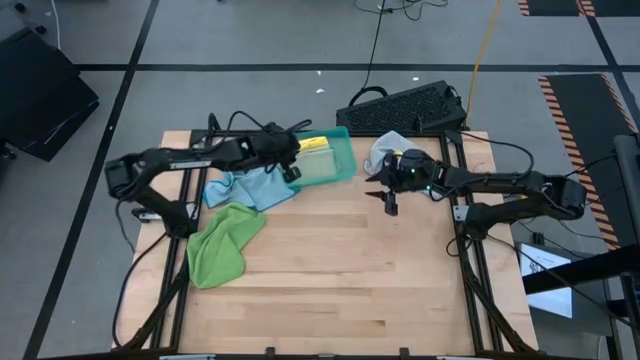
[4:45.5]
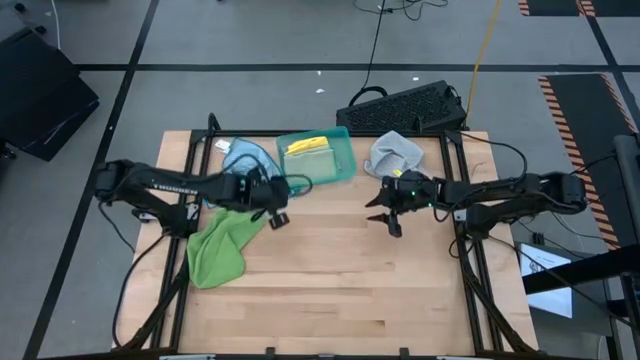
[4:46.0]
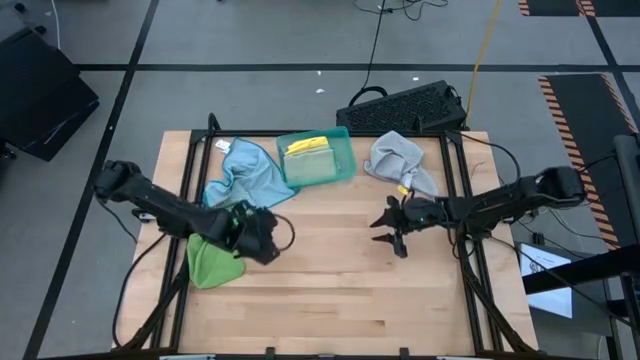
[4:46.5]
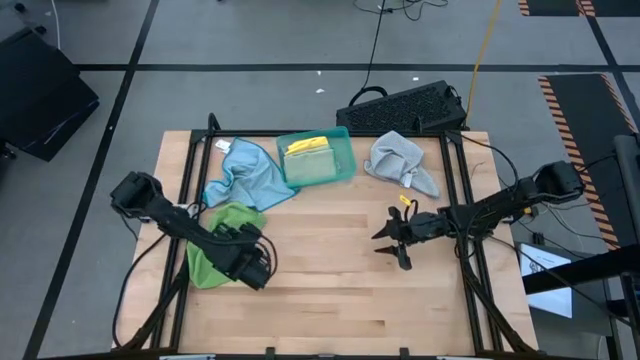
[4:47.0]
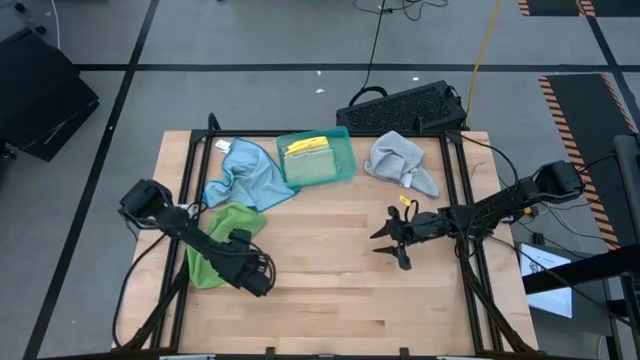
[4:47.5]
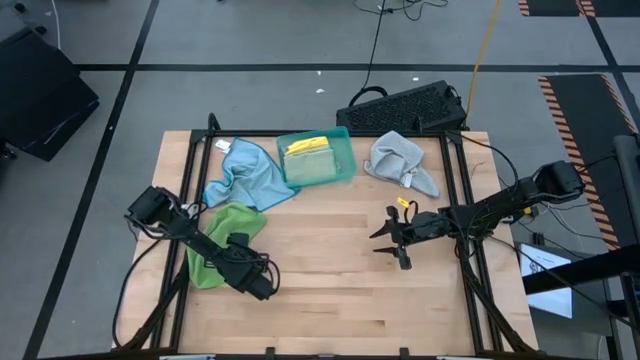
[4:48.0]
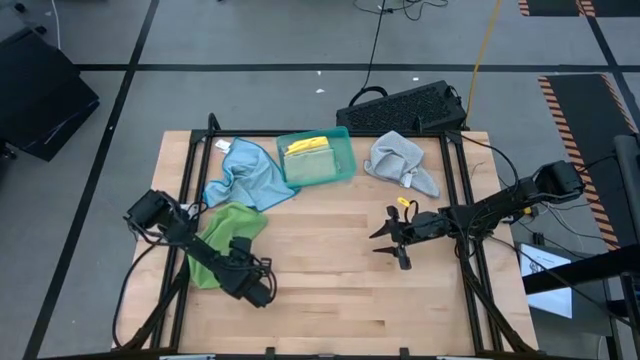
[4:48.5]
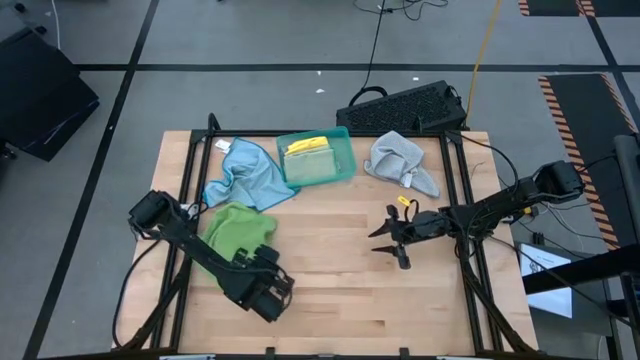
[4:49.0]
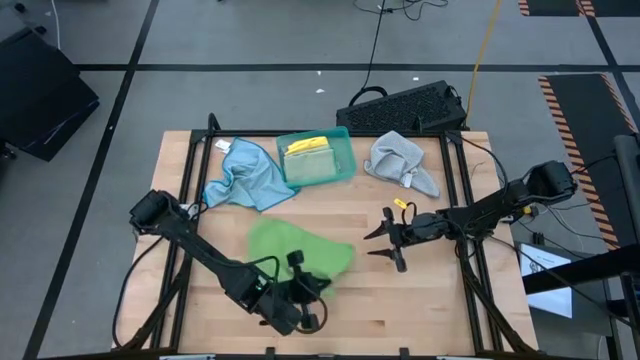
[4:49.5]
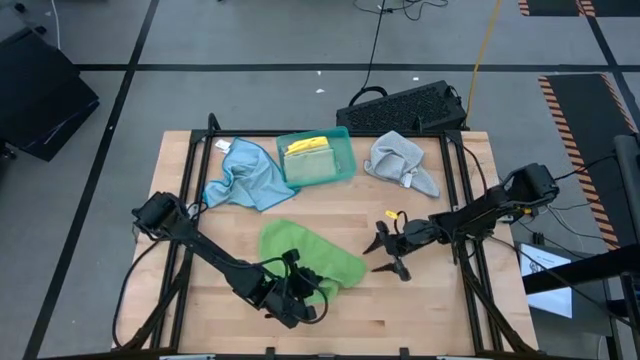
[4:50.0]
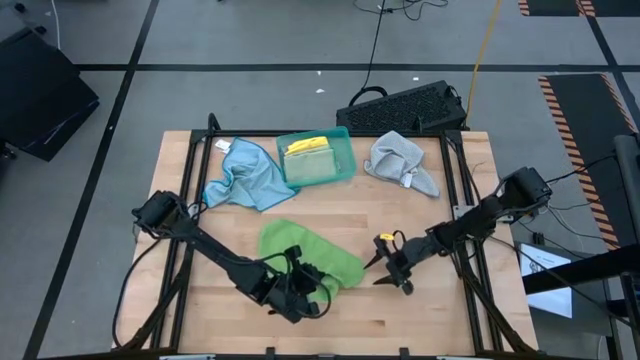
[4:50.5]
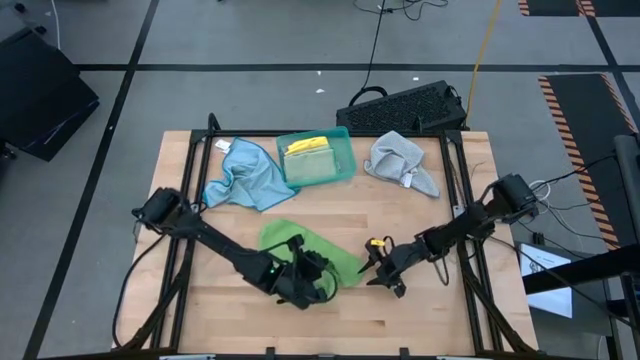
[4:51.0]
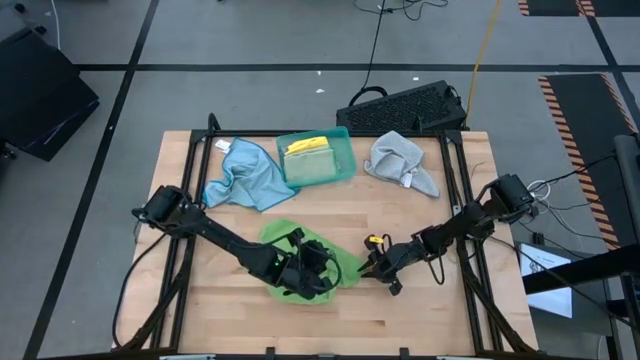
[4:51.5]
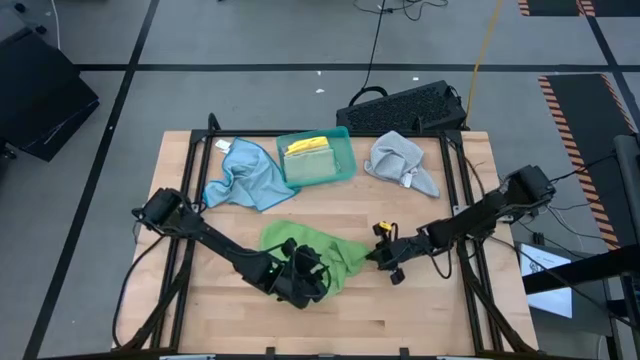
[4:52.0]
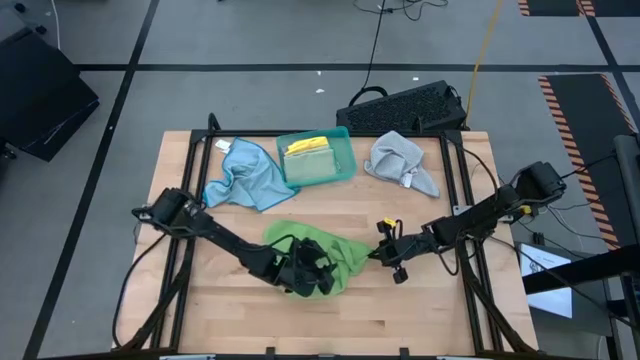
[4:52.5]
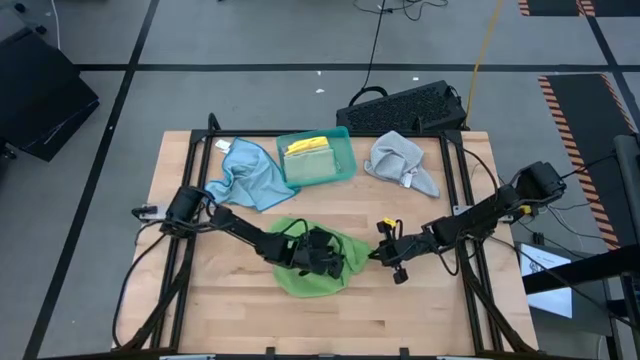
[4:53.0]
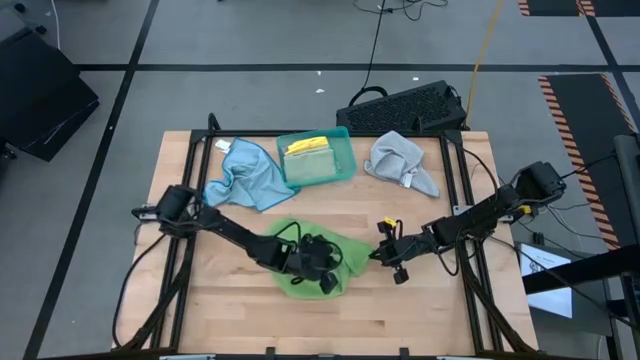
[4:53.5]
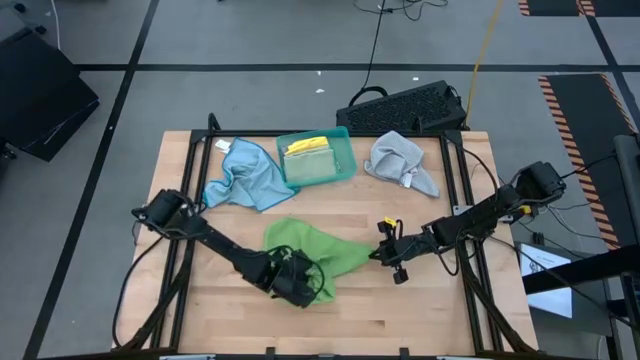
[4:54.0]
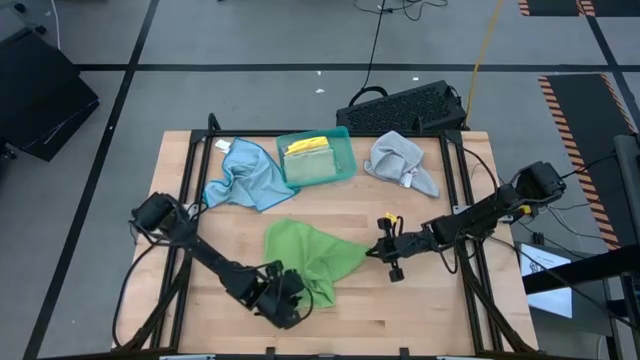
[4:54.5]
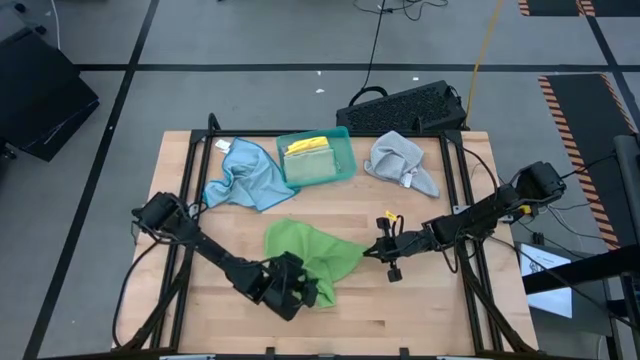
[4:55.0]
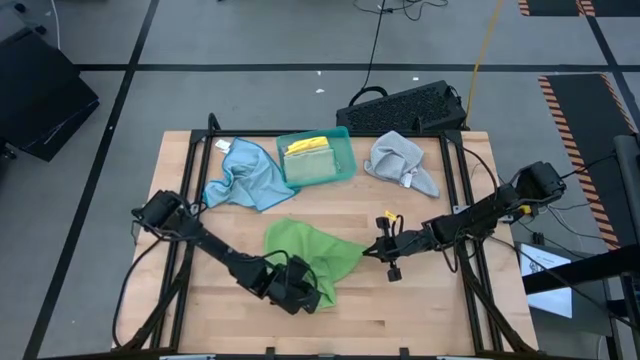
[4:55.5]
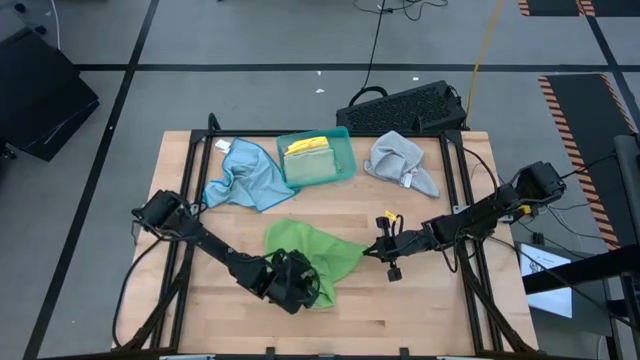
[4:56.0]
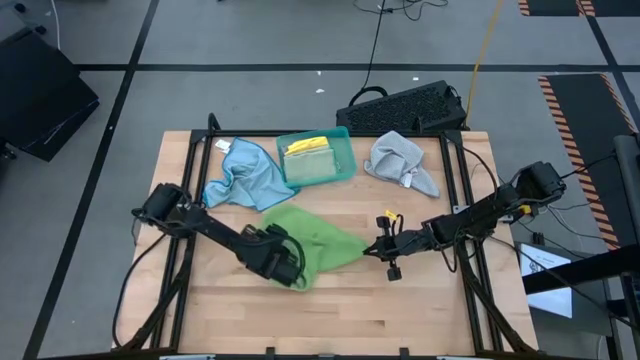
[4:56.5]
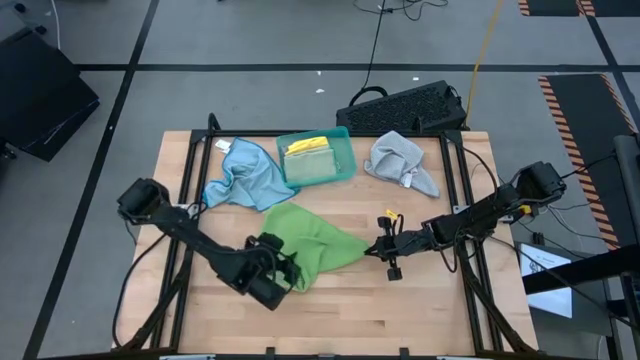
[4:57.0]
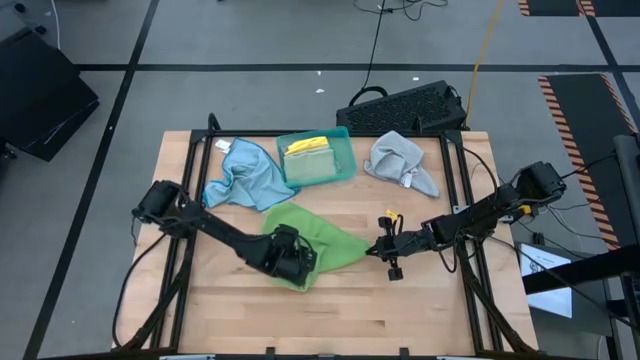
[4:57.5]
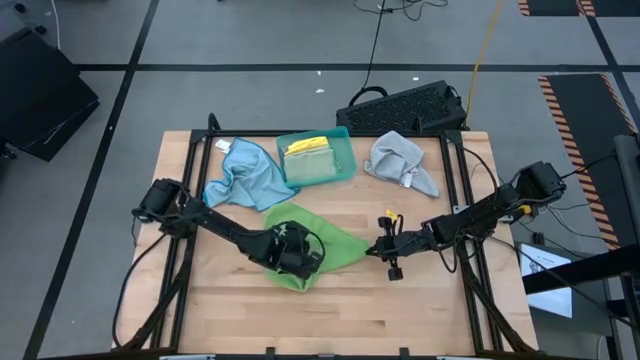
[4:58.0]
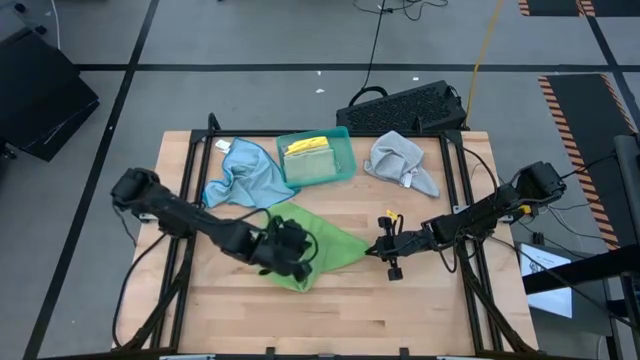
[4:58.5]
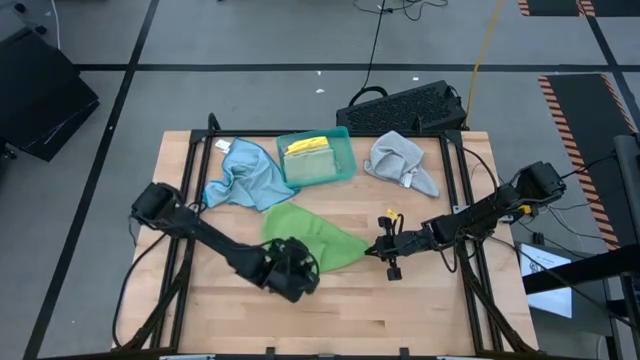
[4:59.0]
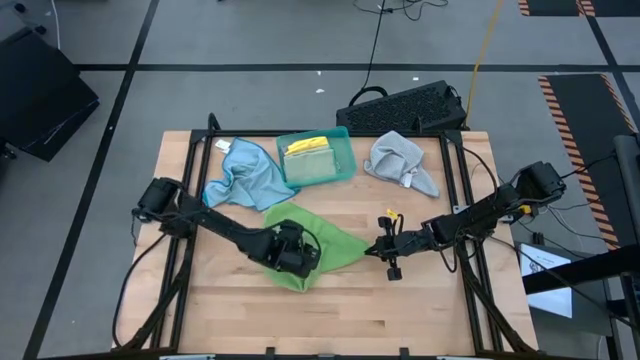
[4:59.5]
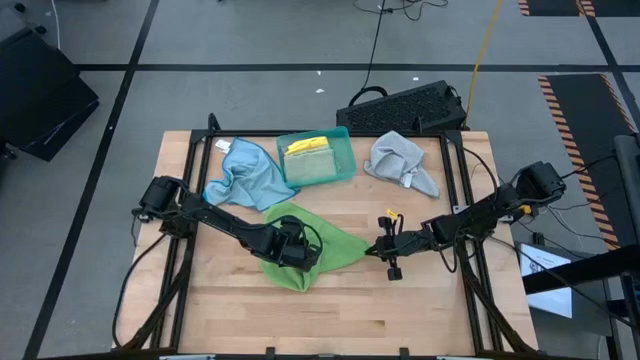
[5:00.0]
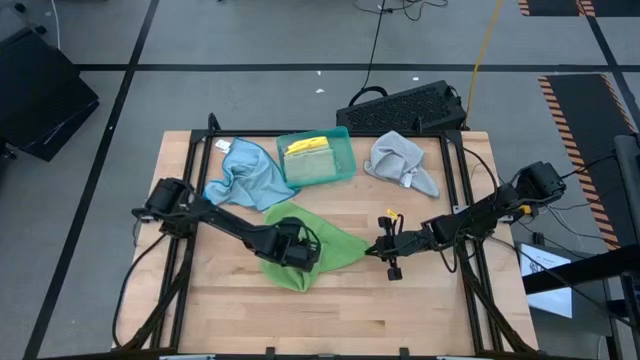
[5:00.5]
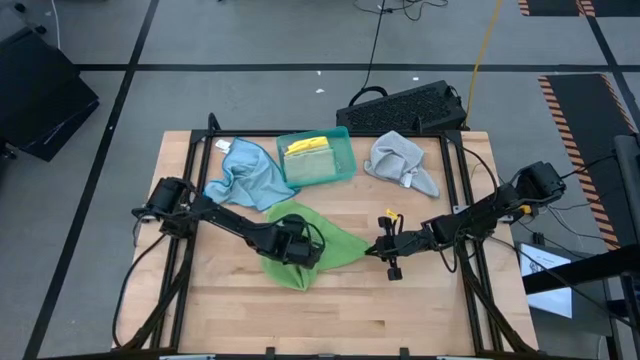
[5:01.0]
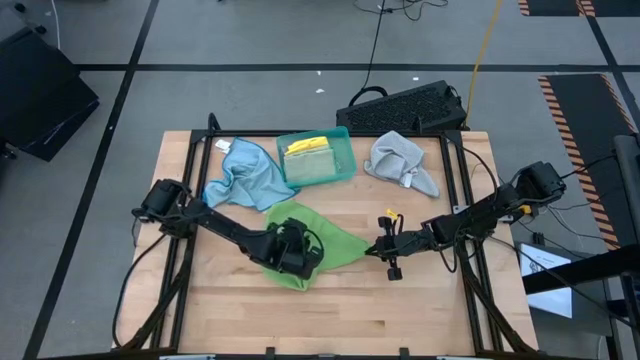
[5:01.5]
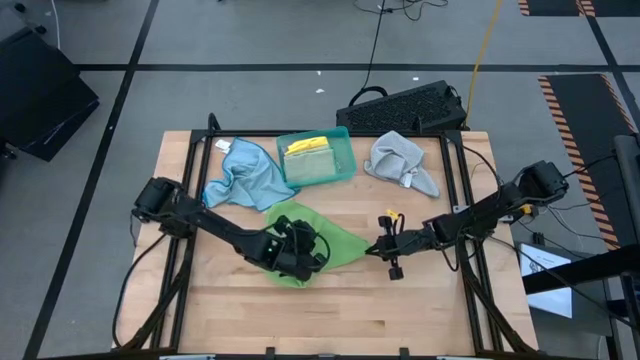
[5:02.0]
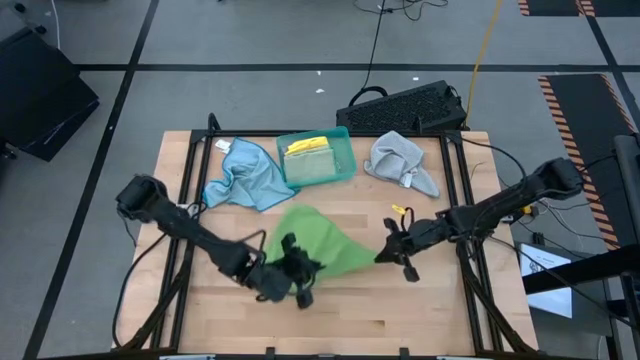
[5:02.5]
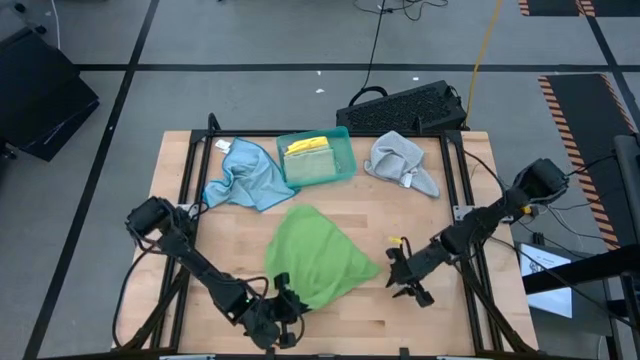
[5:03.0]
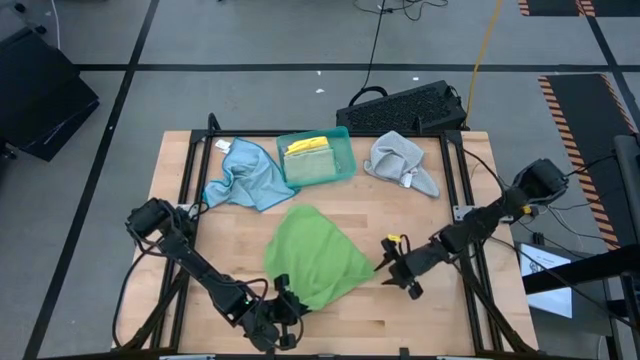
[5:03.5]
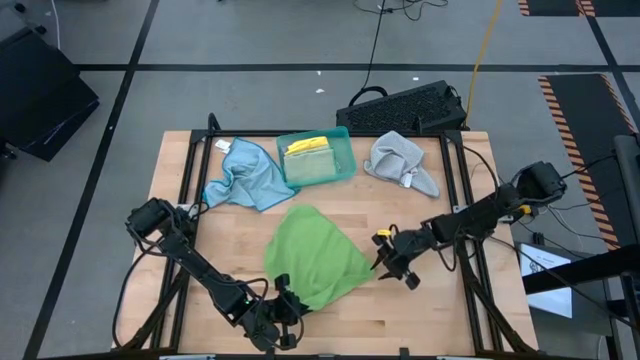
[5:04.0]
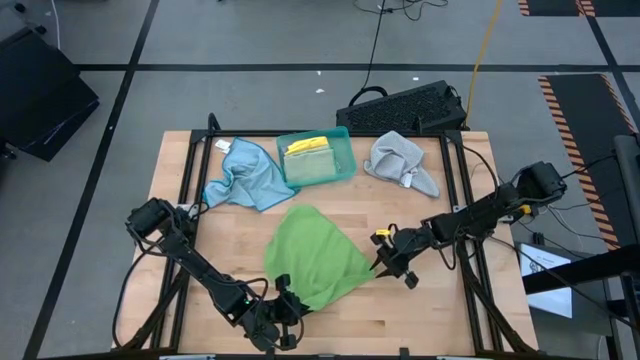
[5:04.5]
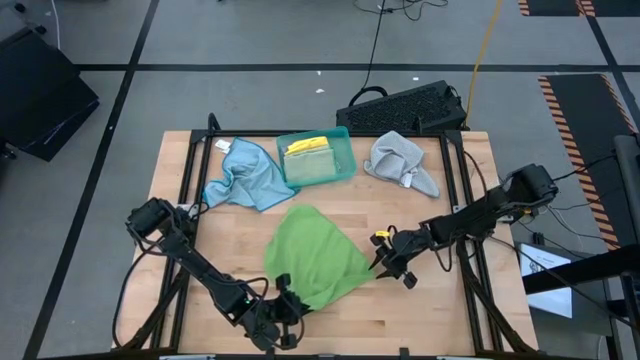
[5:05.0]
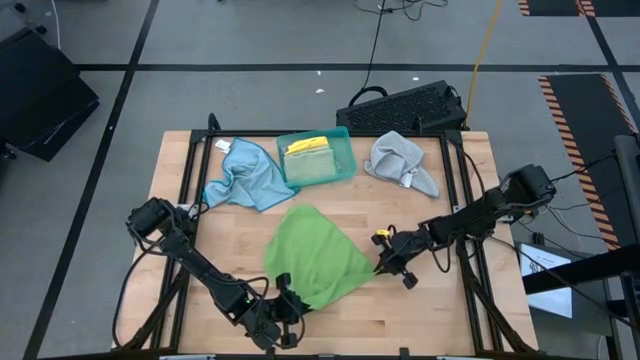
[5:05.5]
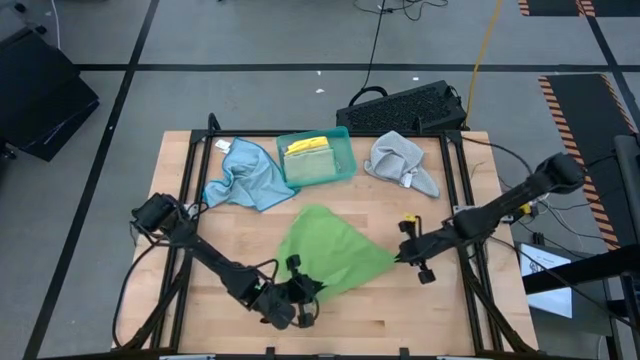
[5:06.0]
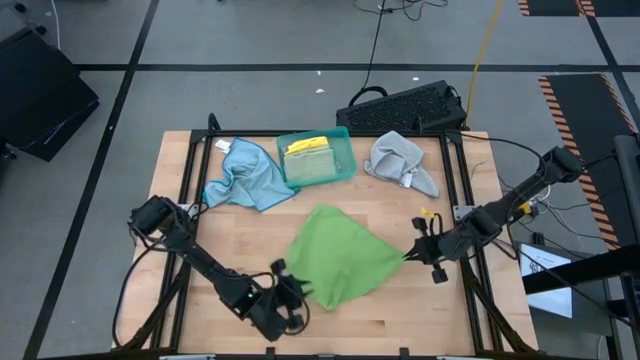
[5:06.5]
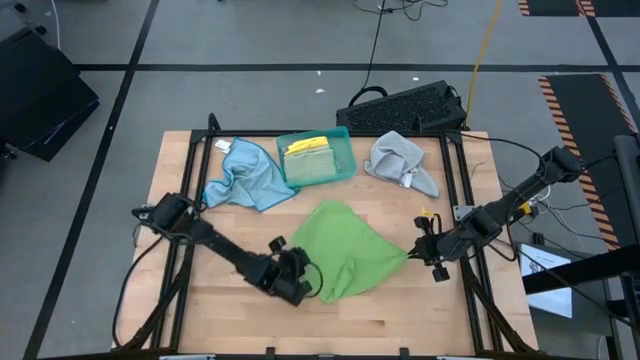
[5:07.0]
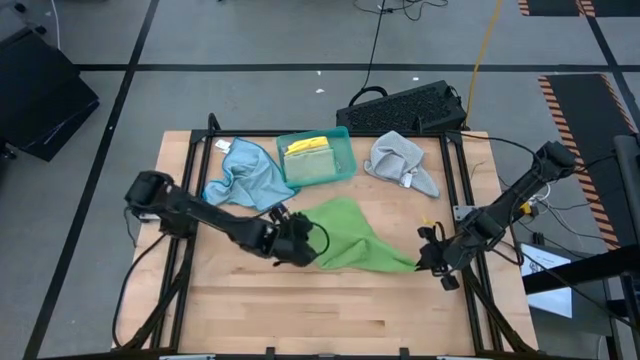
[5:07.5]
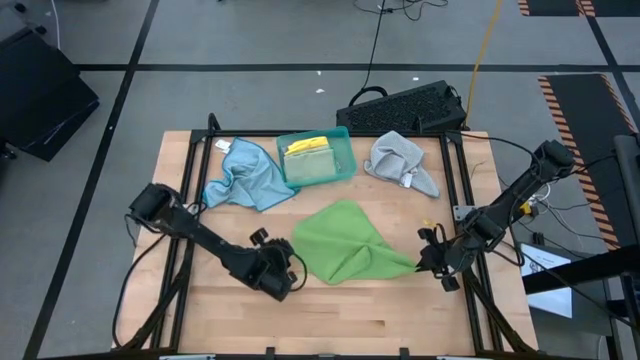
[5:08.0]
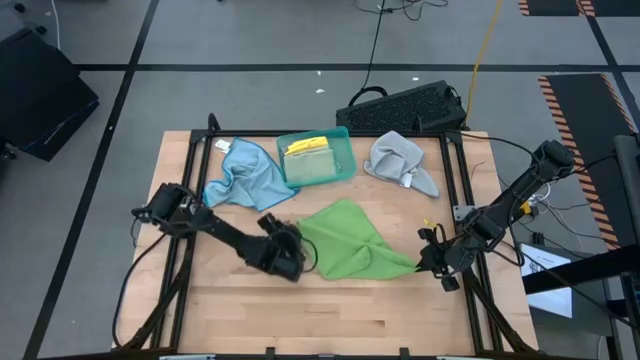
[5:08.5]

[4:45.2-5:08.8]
Task: Fold microfiber towels
Fold the green microfiber cloth
